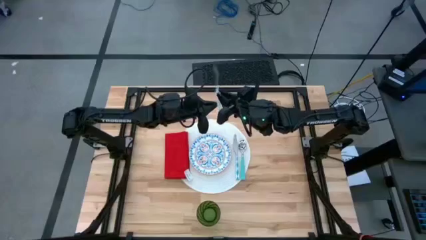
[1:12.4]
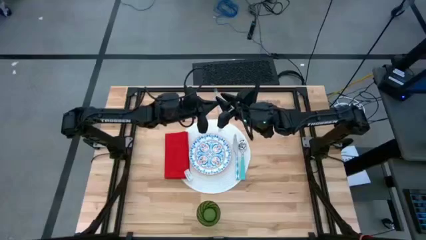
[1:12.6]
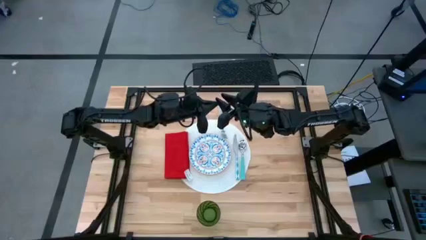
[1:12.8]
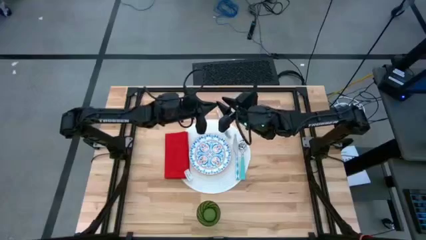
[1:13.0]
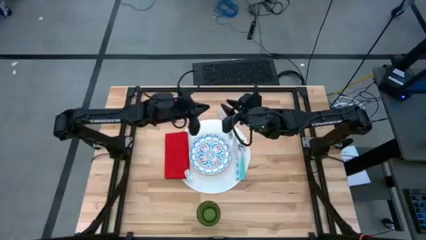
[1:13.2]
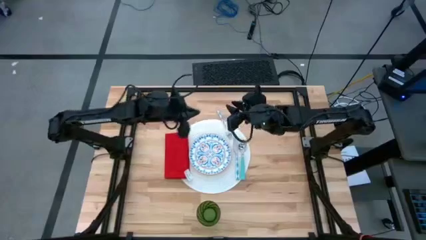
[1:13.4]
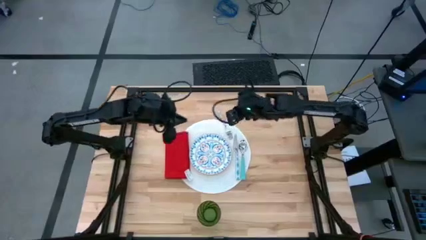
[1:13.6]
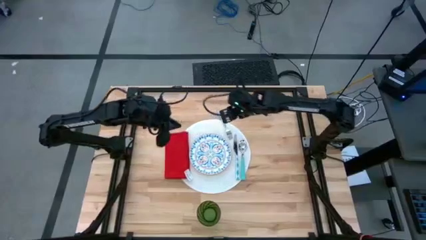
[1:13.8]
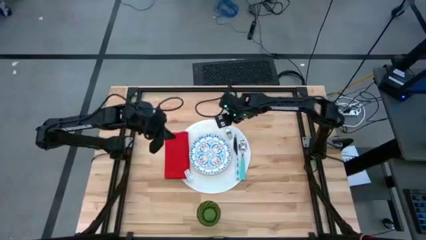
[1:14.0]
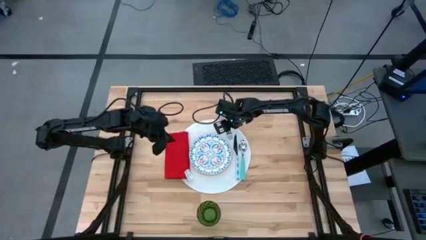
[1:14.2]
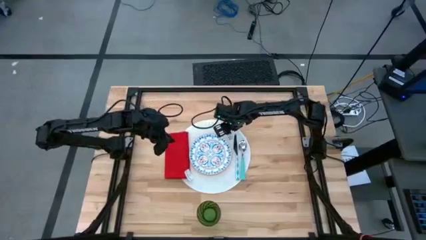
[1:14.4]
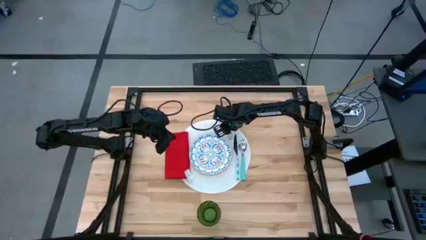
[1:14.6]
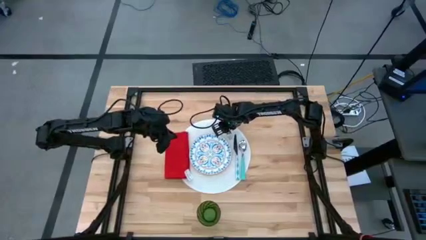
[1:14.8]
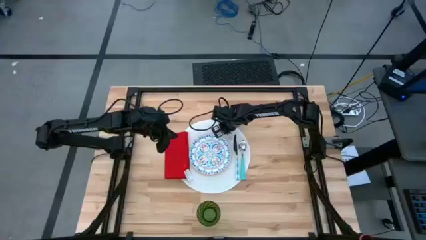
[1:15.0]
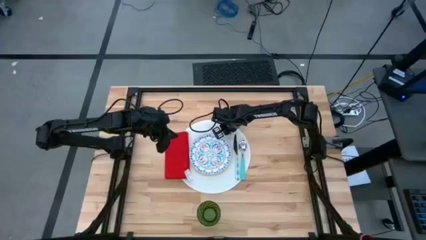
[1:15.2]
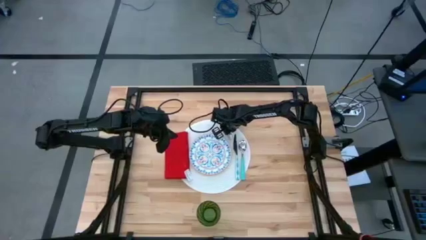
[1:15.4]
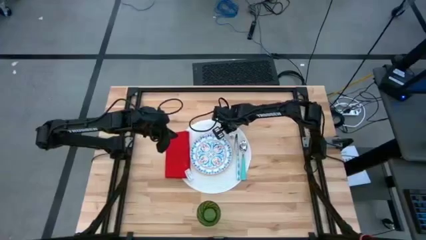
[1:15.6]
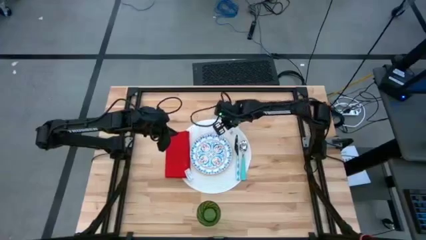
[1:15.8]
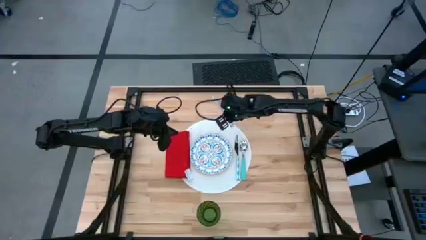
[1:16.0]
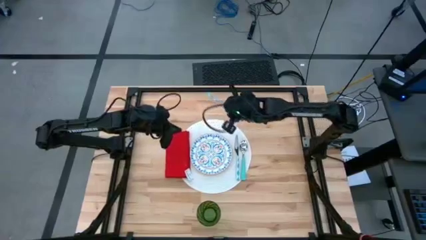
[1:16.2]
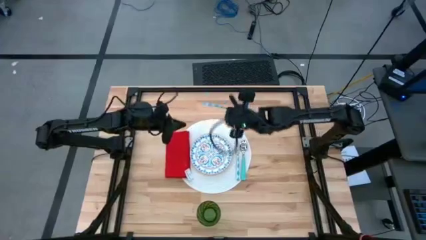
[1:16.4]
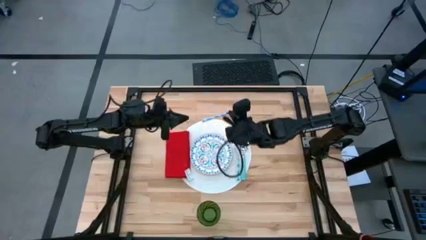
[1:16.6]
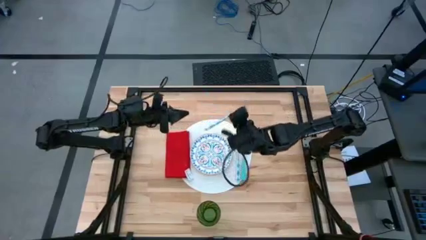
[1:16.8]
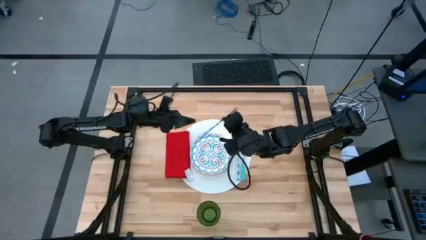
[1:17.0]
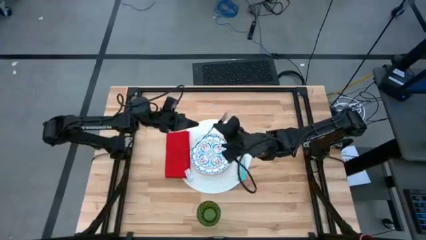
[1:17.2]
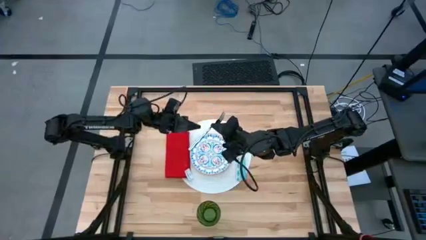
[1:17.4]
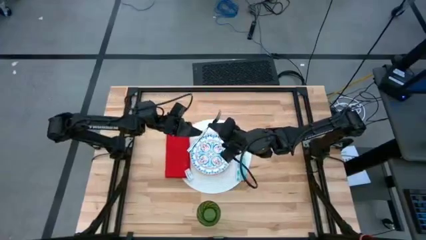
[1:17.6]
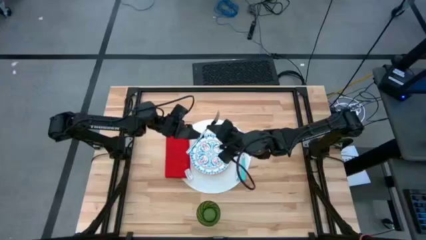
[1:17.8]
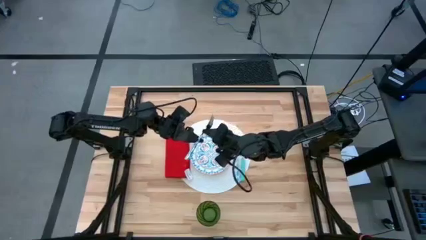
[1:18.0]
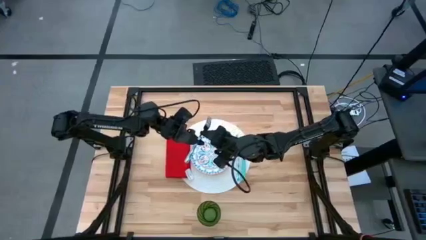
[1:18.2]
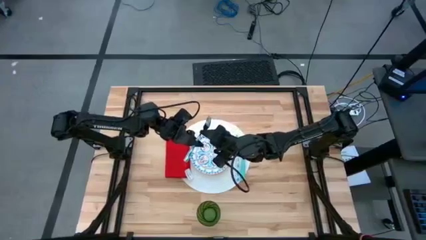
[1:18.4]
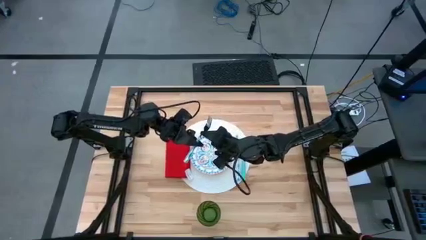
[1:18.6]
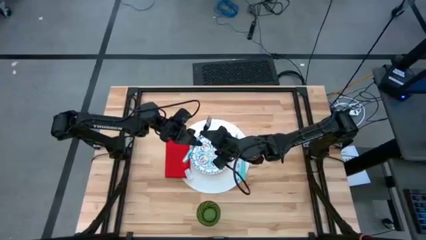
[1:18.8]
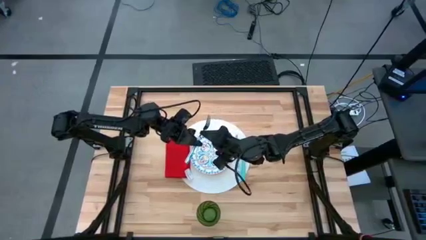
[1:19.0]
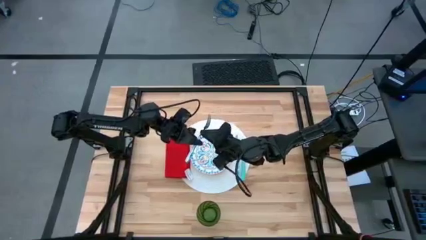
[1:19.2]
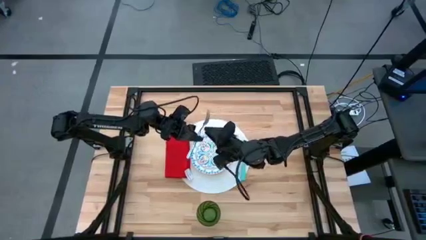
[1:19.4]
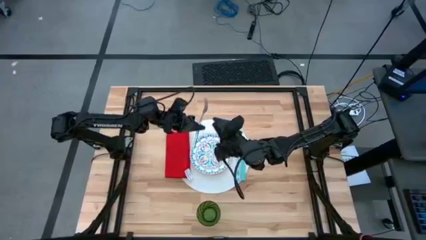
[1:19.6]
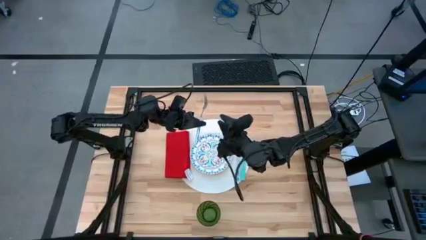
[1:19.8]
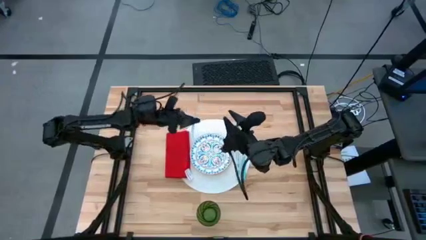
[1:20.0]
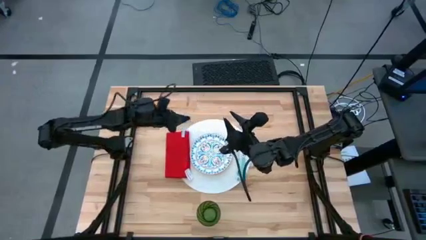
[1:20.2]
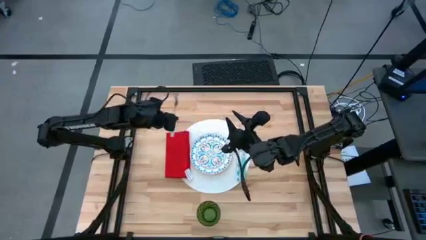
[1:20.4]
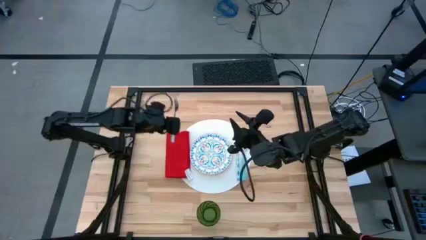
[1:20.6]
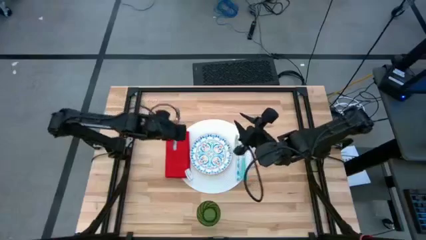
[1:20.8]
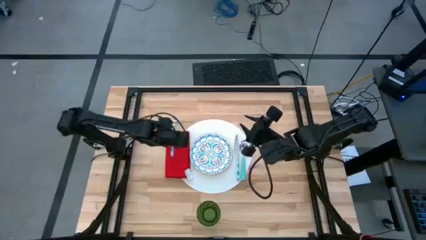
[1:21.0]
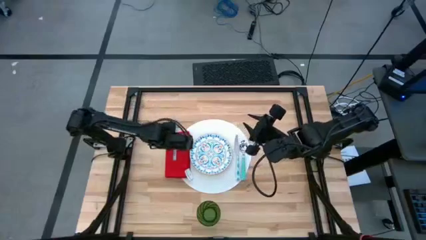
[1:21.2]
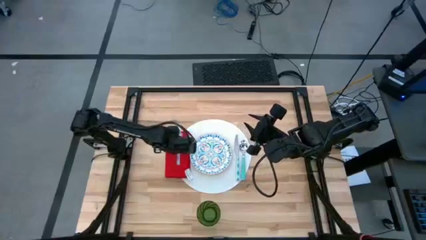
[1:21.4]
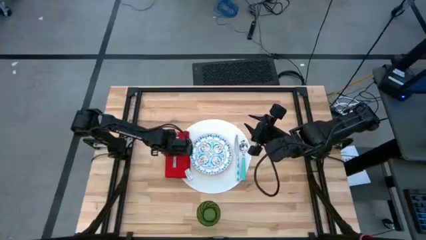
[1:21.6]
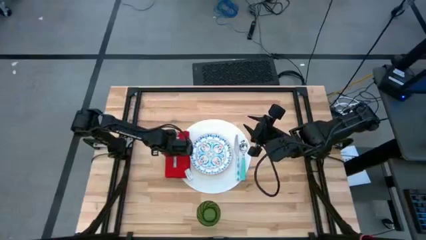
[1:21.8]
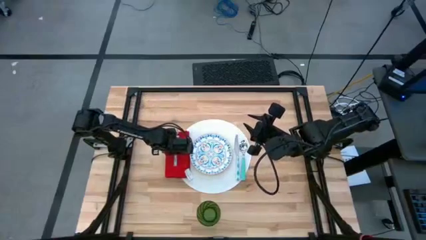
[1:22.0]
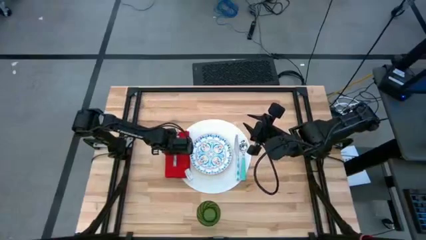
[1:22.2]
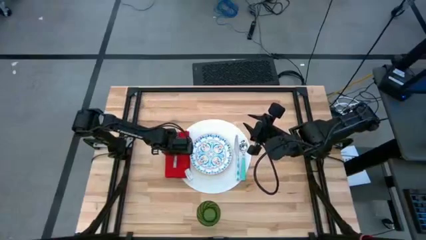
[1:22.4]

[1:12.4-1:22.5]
Task: Set table place
Put the white fork on top of the red table napkin on the white tablemat

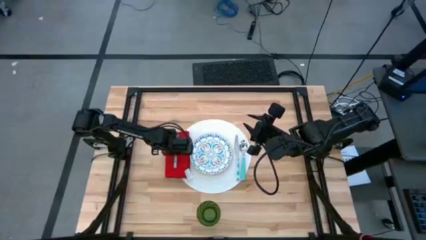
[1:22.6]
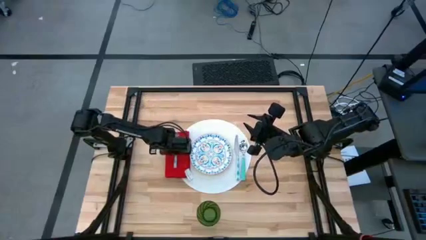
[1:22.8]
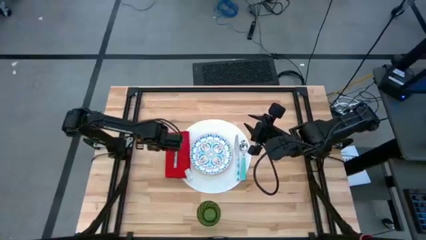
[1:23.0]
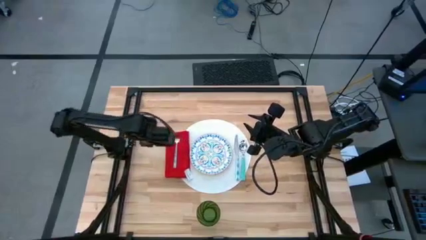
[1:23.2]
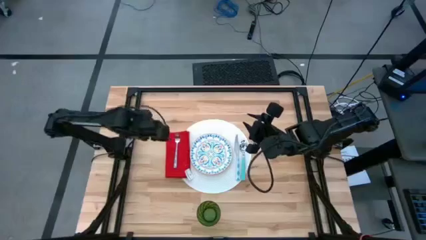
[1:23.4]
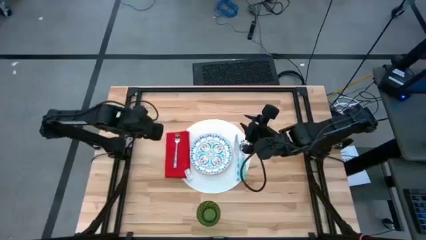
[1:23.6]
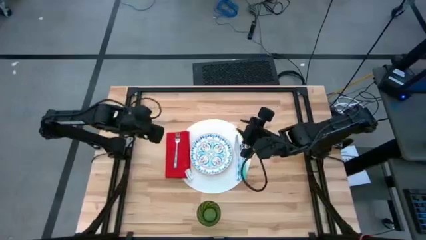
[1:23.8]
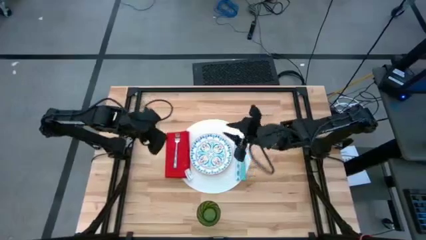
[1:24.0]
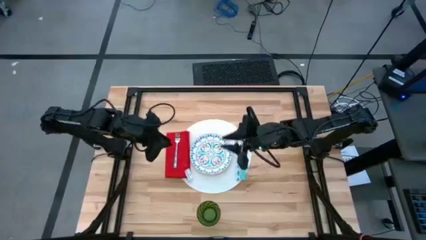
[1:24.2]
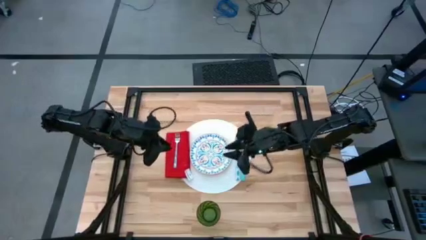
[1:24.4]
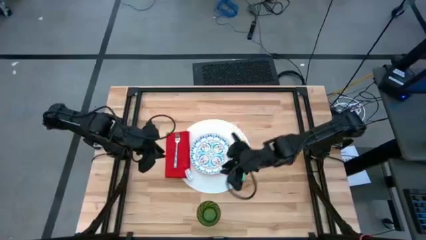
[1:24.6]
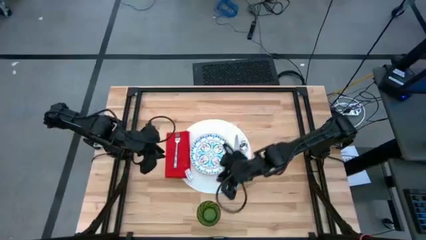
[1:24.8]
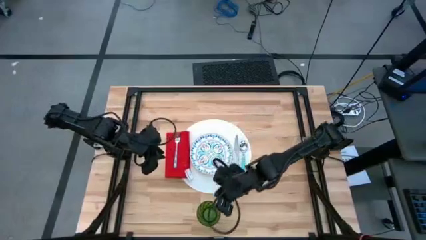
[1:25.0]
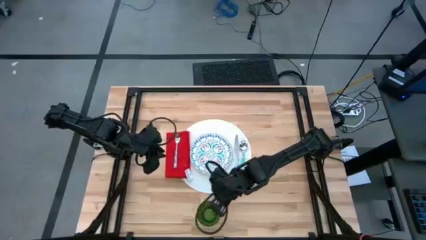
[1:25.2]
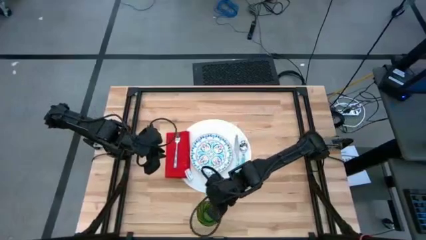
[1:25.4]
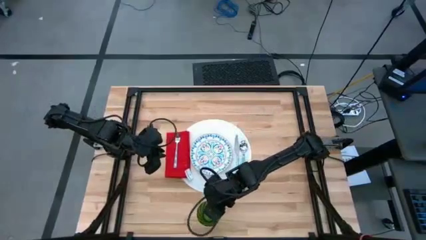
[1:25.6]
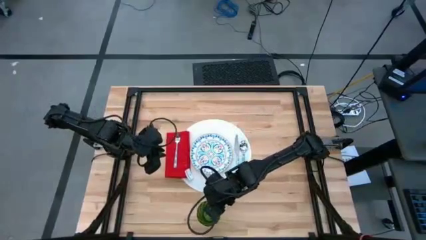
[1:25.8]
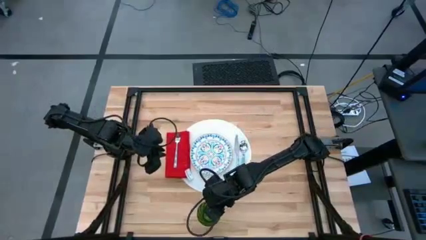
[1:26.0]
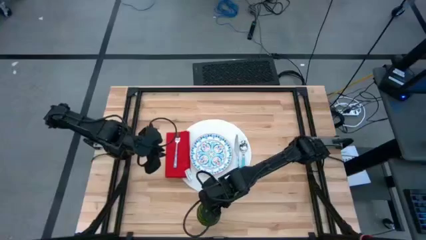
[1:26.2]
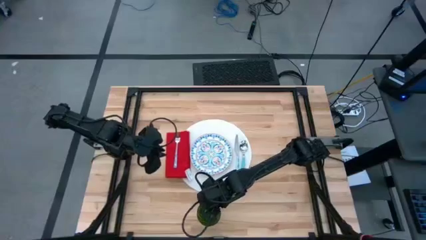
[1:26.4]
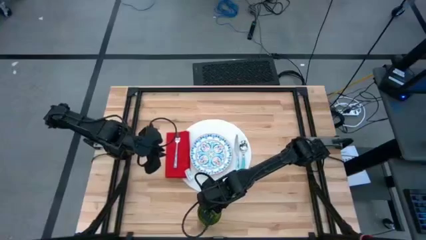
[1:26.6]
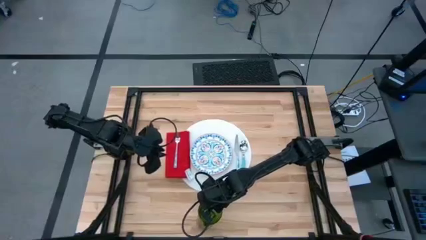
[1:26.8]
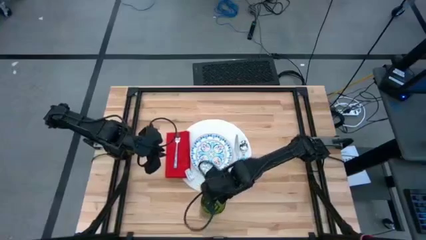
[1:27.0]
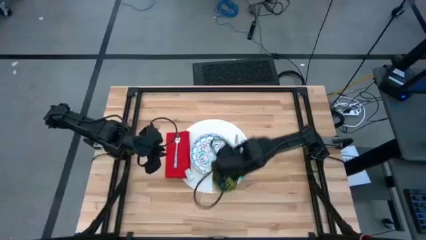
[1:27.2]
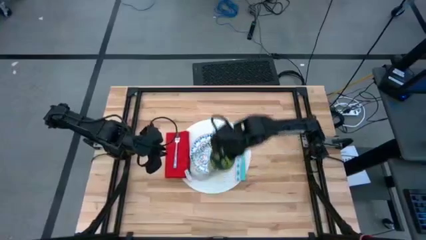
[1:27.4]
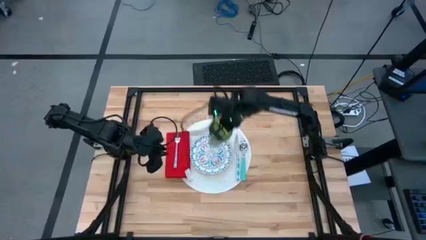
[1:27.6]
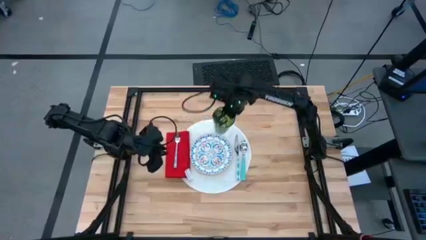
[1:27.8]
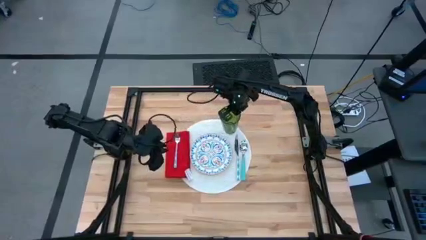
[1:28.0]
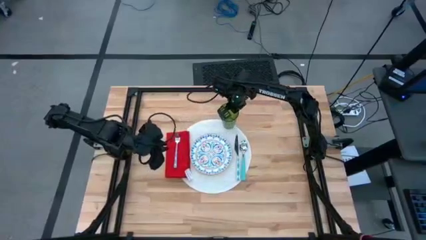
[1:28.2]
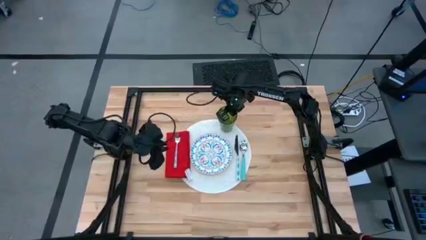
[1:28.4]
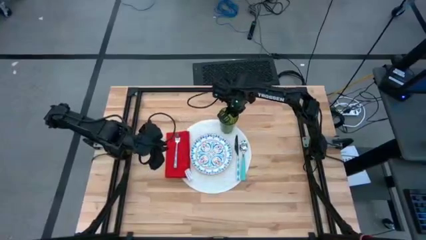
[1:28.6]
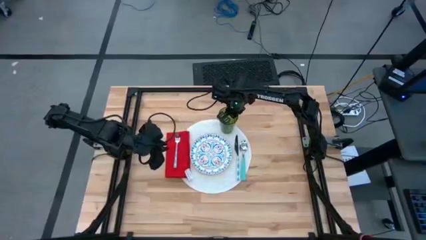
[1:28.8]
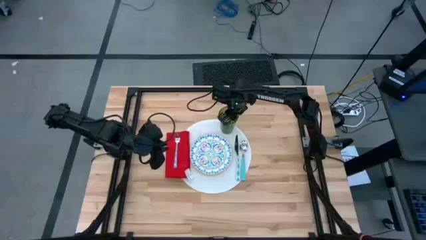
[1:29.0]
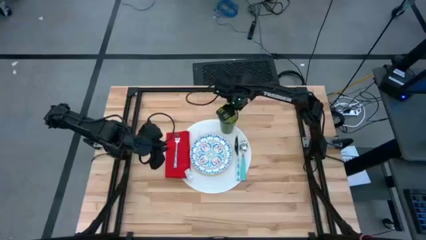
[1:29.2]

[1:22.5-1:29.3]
Put the green cup on top of the blue patterned plate on the white tablemat
